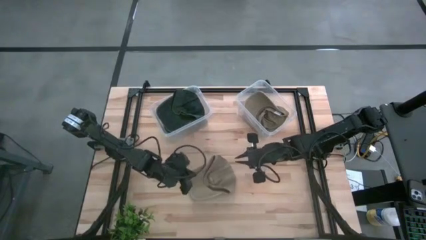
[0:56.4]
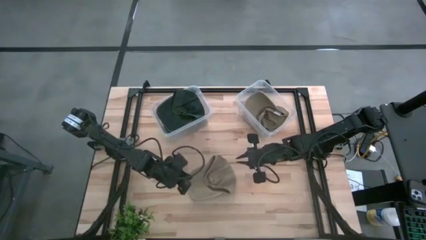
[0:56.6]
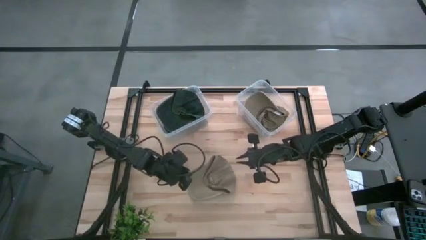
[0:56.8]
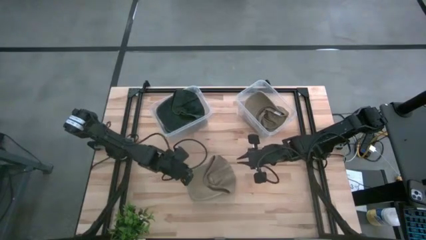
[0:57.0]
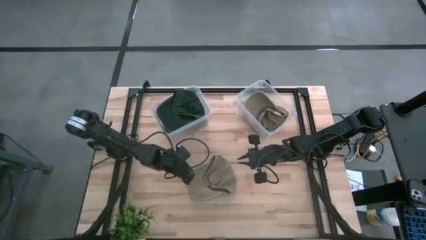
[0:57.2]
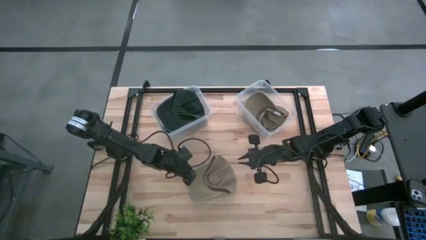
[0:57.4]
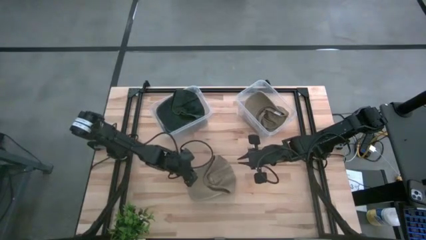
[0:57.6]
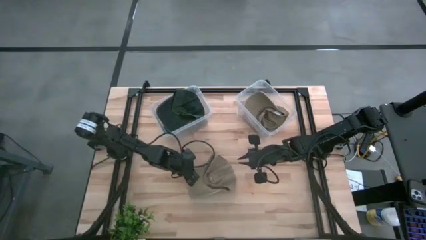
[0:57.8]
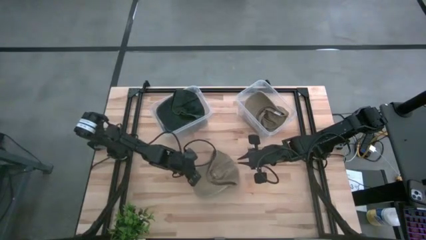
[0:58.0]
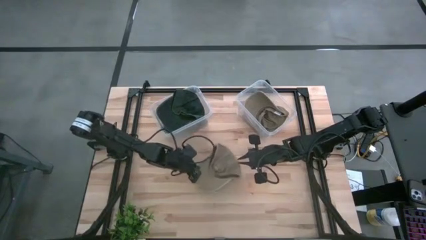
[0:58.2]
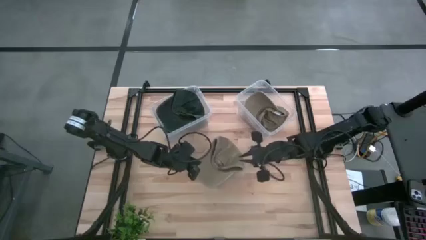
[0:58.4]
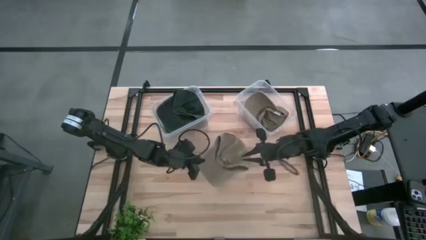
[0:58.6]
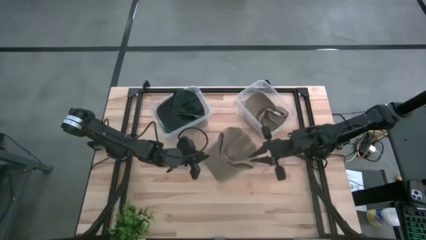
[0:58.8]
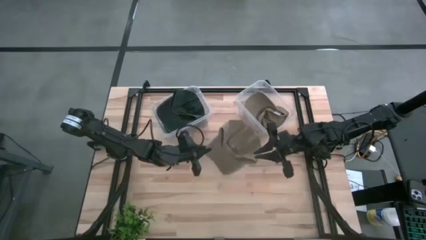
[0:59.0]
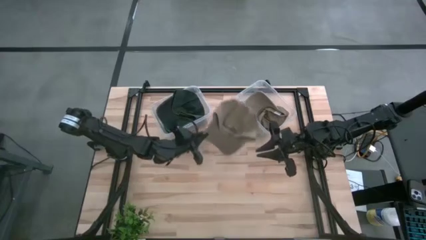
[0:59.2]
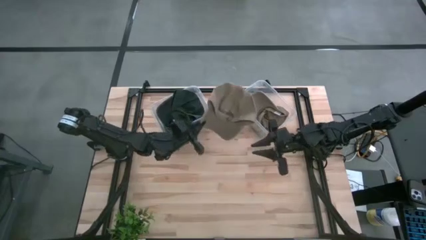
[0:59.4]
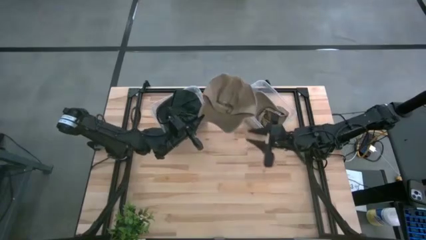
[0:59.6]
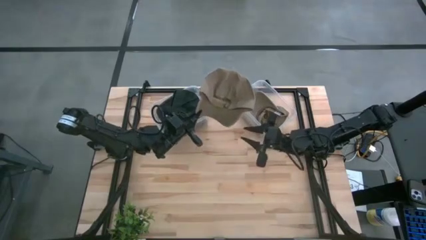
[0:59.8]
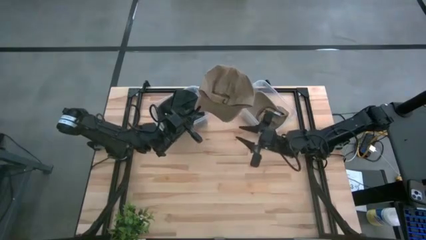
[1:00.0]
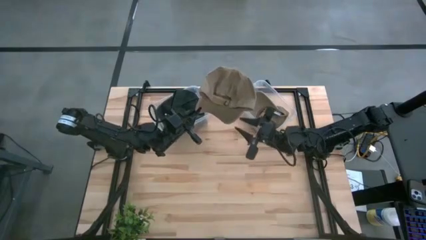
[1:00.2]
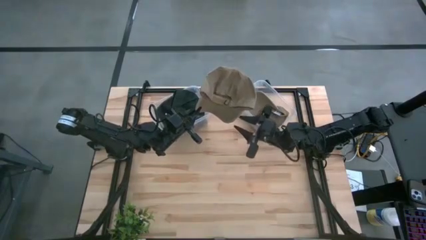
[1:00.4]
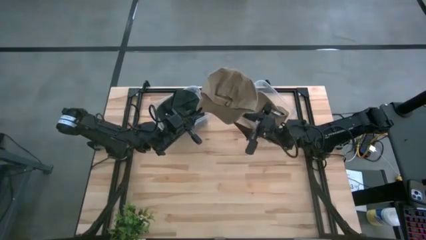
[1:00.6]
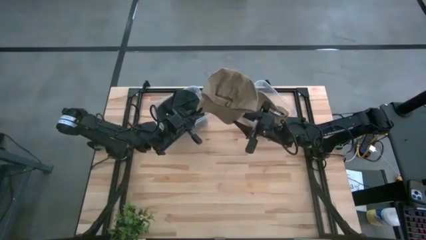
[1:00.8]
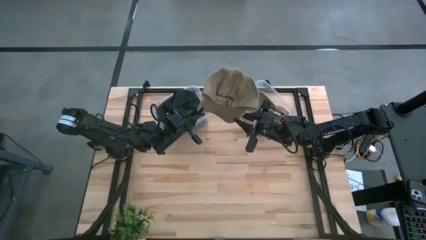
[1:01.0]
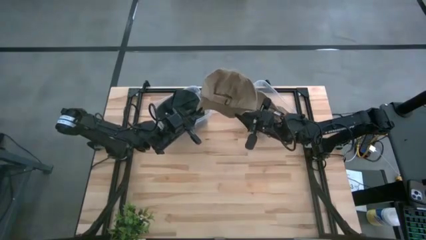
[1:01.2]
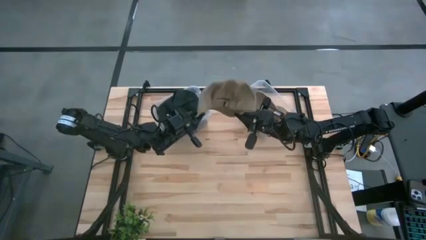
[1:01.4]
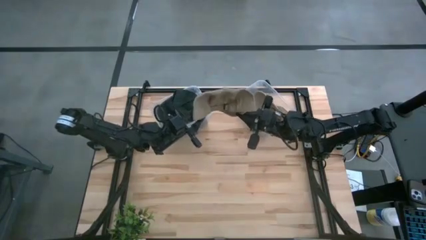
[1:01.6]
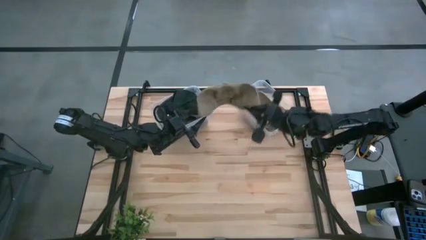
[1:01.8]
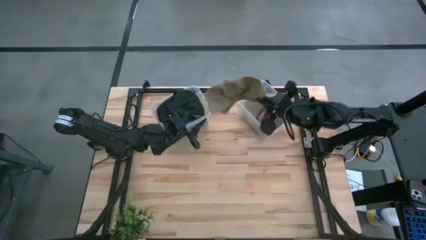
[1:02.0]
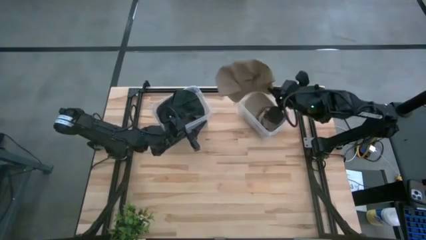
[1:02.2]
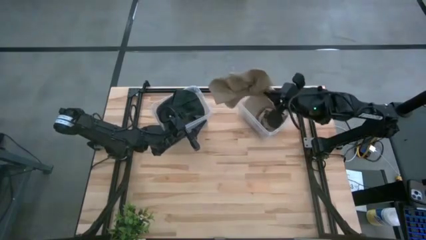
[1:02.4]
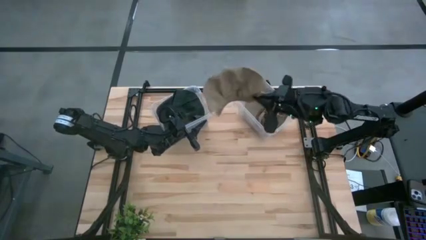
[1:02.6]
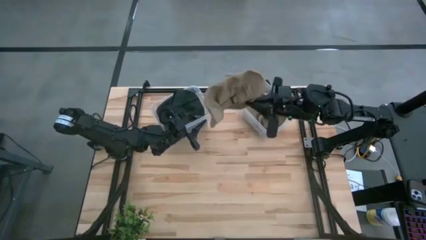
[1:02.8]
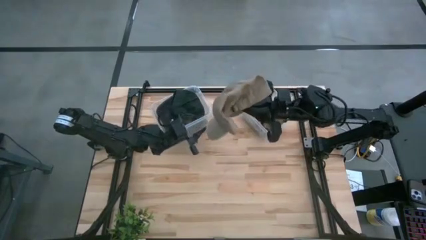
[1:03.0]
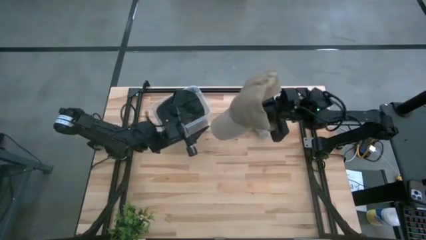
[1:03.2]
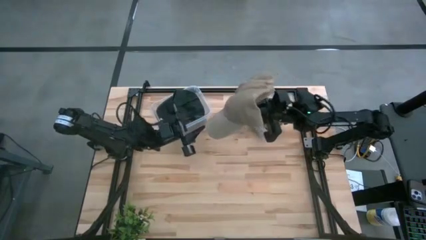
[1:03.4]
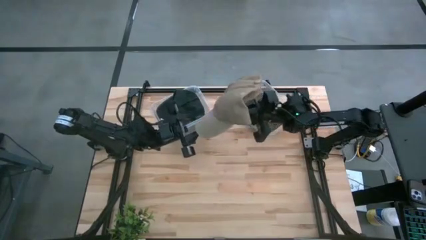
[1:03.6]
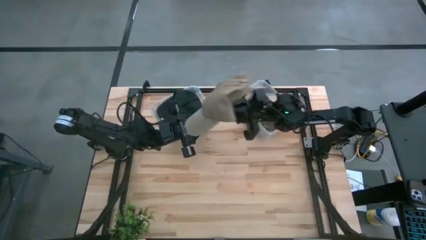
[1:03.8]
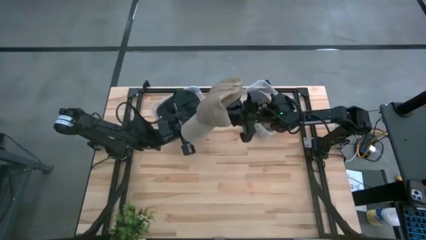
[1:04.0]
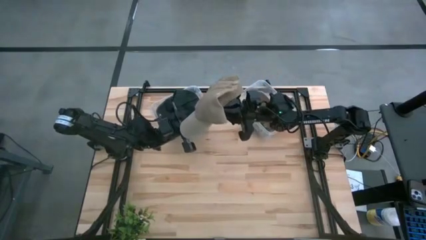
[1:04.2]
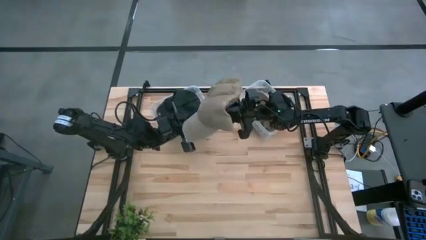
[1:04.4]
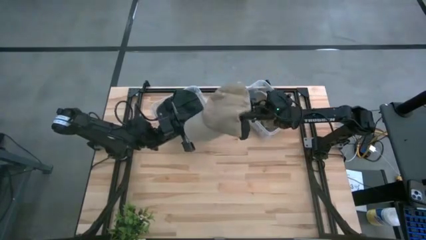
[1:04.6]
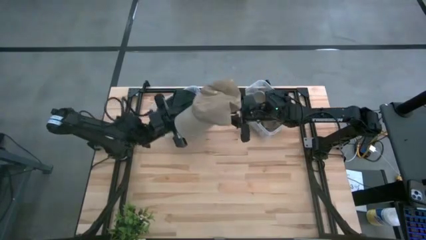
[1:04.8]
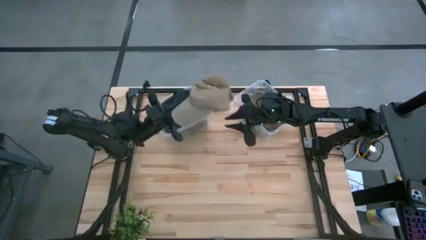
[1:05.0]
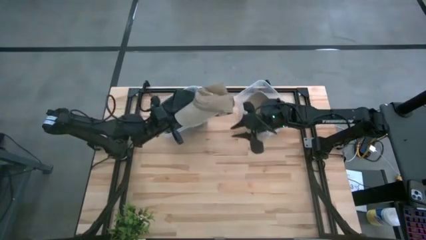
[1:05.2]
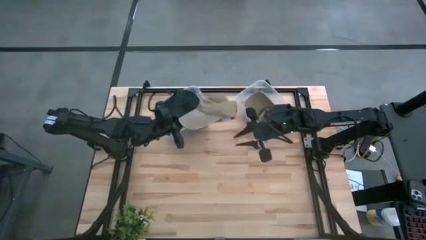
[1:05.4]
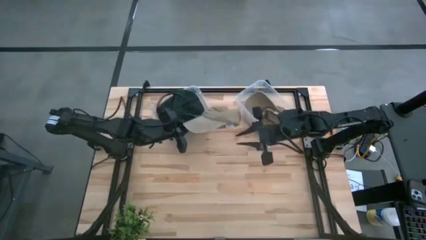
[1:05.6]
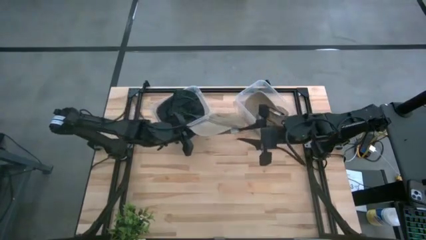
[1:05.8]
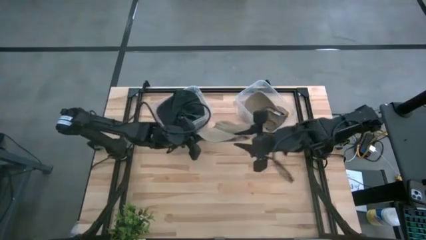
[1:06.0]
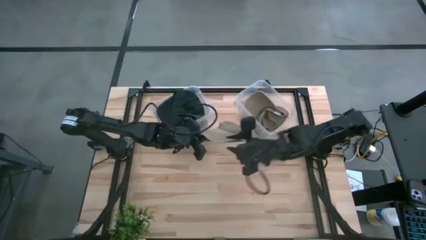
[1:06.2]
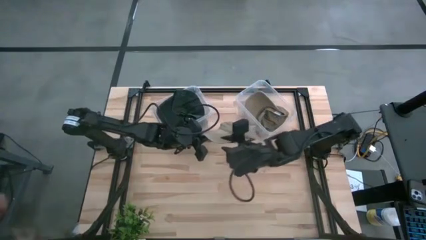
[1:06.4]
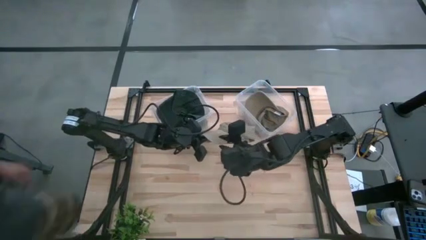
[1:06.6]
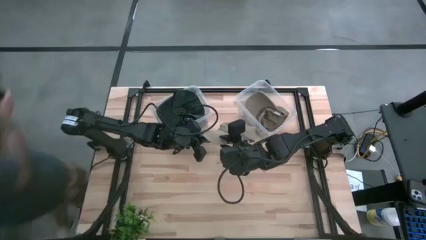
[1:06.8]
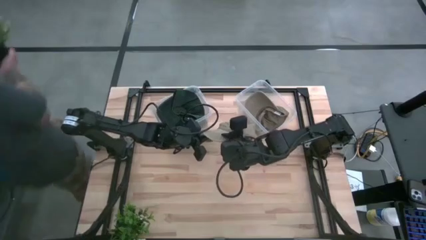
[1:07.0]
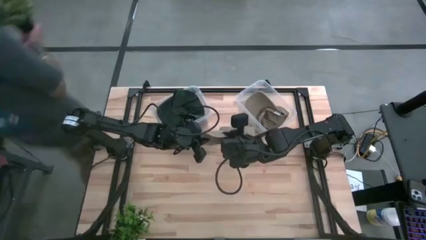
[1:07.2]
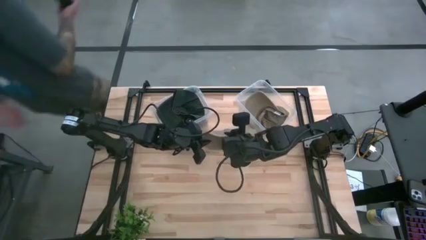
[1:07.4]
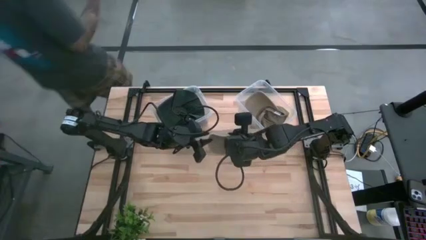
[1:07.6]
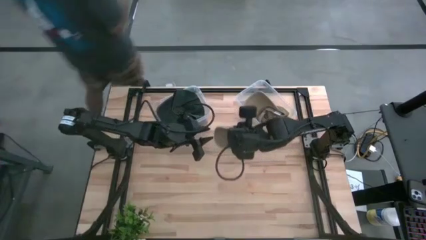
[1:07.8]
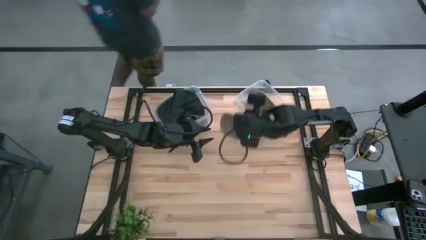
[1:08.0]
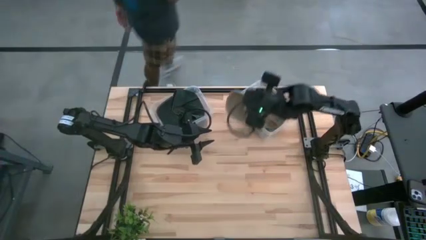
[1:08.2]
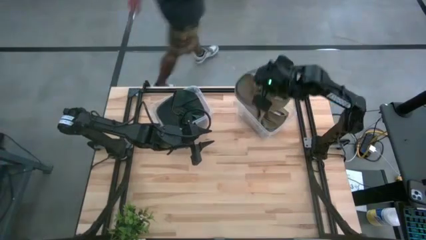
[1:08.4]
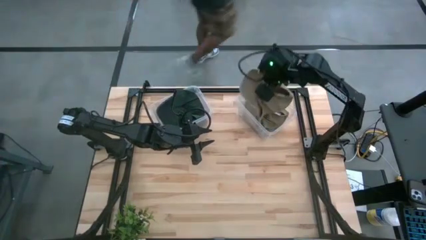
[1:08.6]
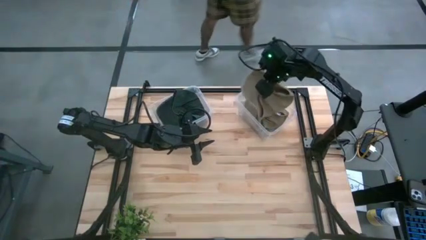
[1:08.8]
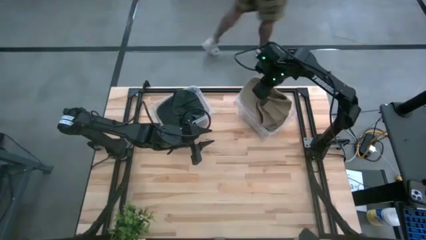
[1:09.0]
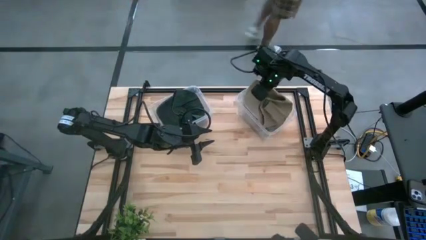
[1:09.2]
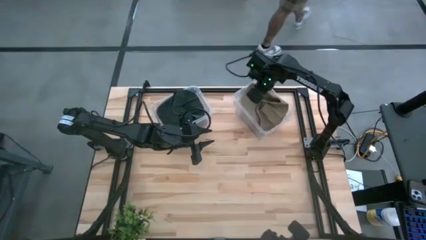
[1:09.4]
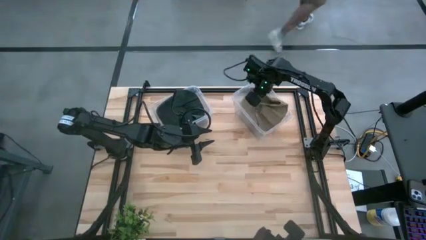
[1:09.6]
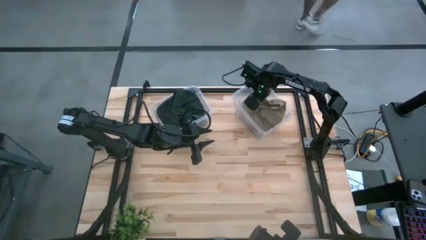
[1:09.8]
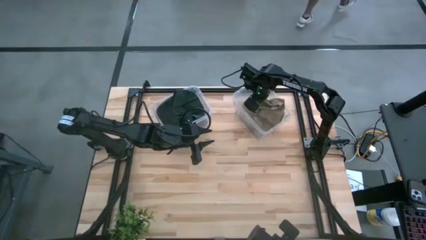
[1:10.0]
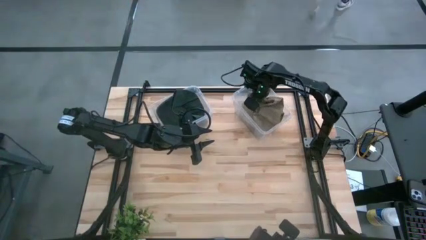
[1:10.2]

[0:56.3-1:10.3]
Task: Pick & Place hat
Put the brown cap into the right transparent bin
